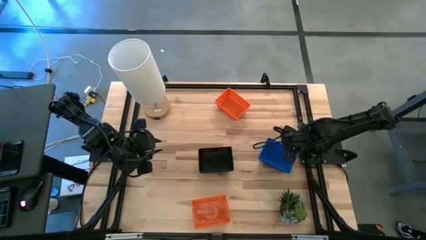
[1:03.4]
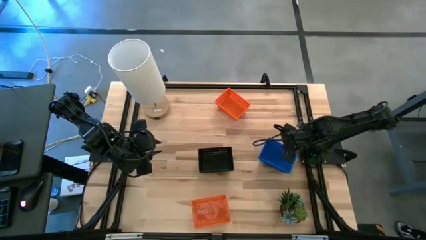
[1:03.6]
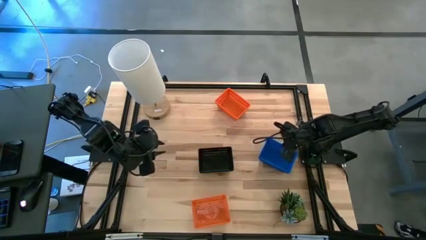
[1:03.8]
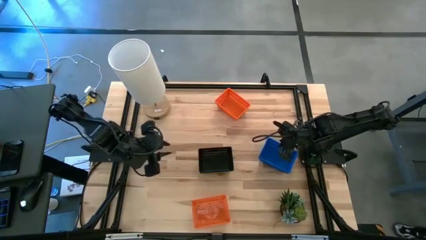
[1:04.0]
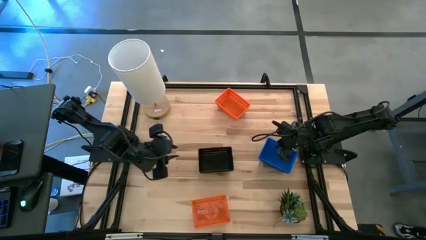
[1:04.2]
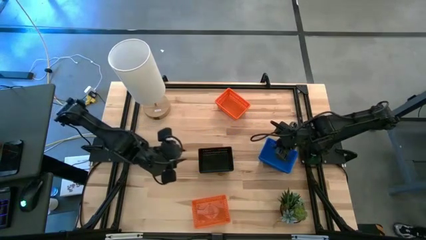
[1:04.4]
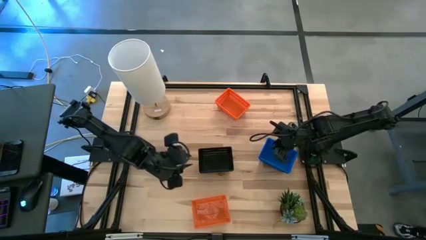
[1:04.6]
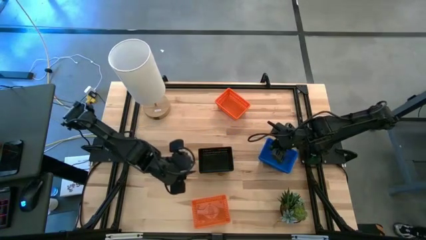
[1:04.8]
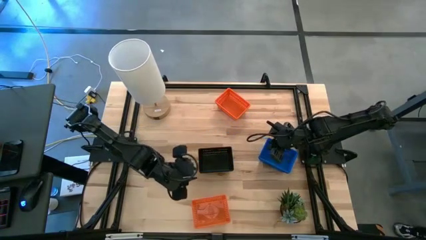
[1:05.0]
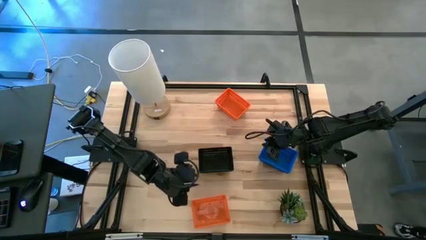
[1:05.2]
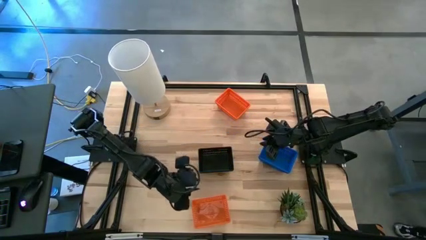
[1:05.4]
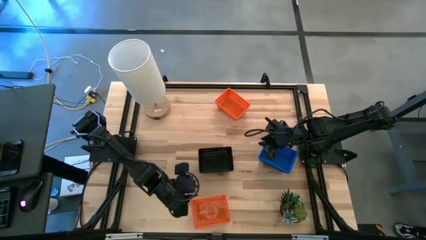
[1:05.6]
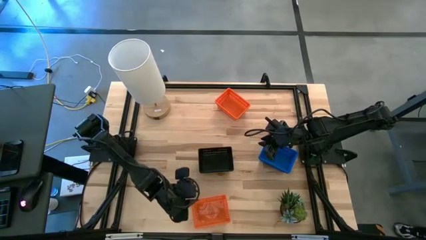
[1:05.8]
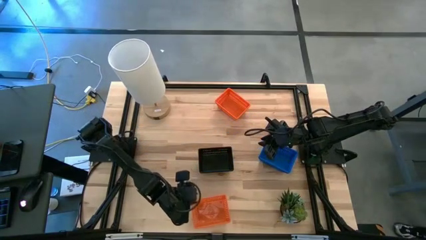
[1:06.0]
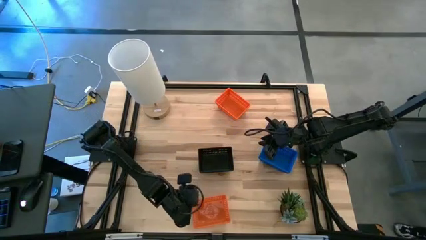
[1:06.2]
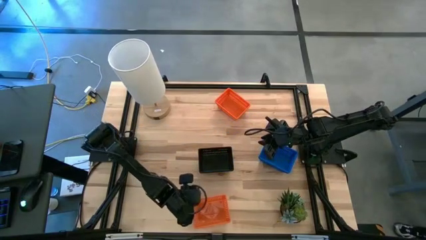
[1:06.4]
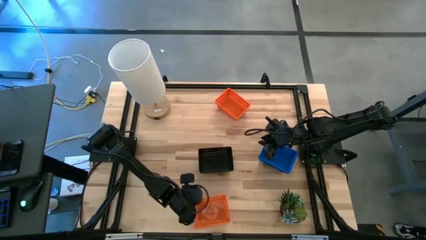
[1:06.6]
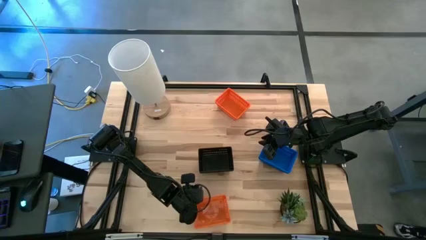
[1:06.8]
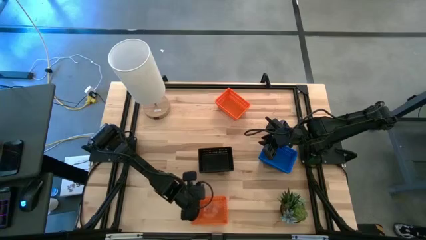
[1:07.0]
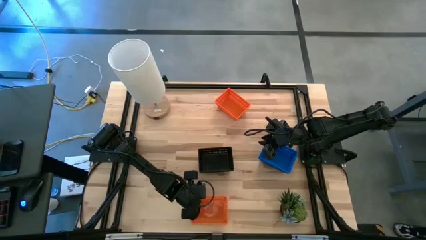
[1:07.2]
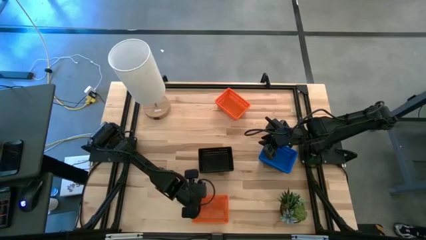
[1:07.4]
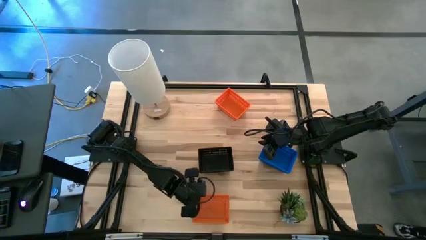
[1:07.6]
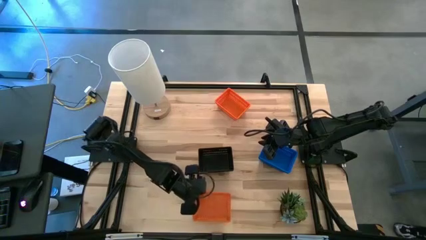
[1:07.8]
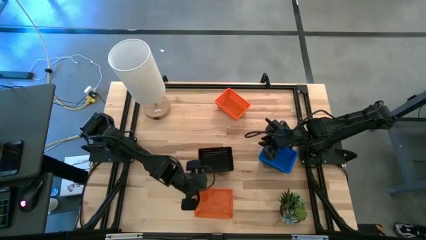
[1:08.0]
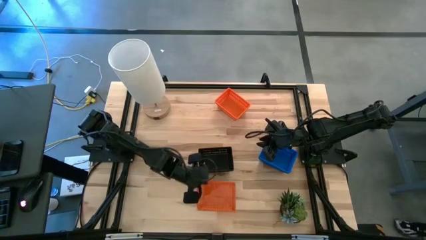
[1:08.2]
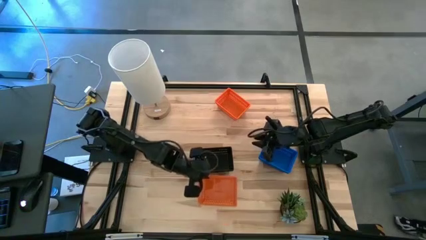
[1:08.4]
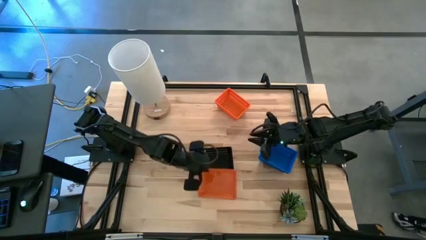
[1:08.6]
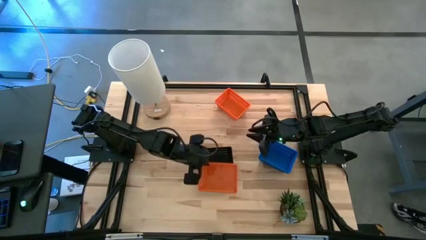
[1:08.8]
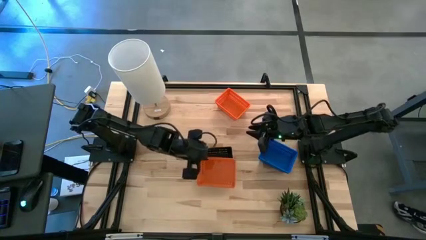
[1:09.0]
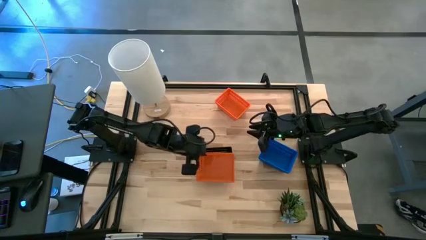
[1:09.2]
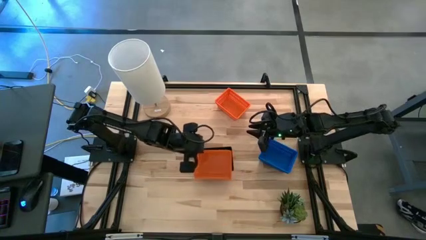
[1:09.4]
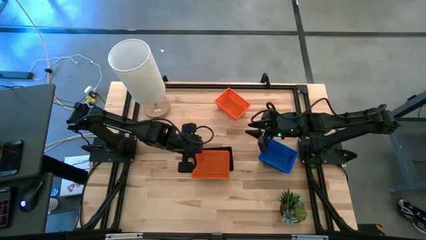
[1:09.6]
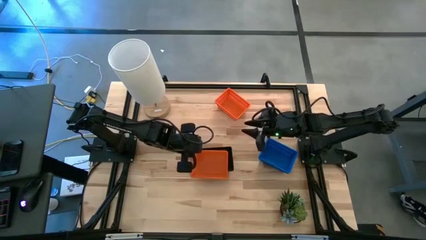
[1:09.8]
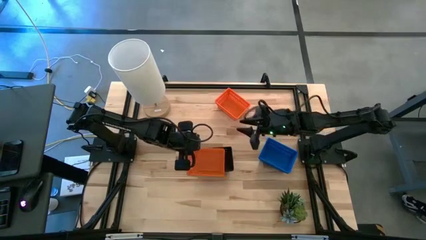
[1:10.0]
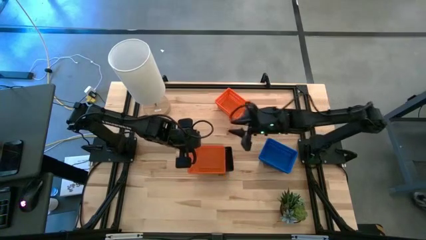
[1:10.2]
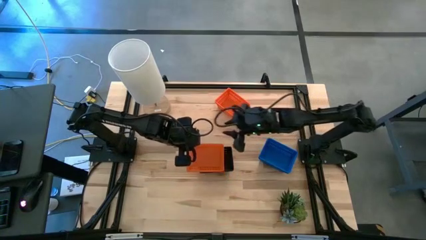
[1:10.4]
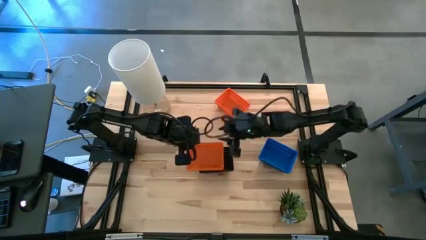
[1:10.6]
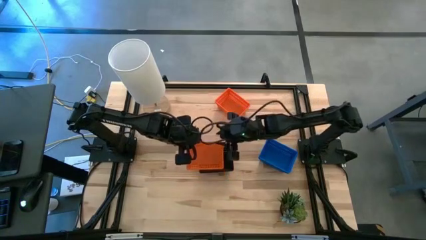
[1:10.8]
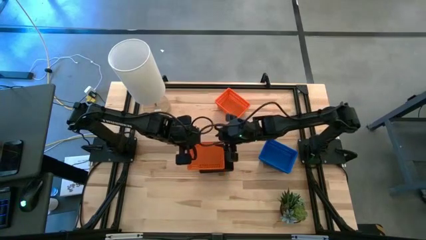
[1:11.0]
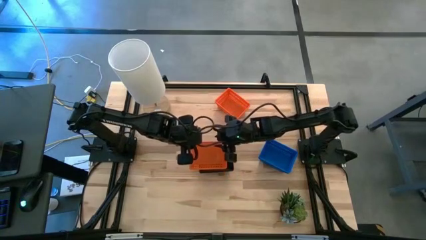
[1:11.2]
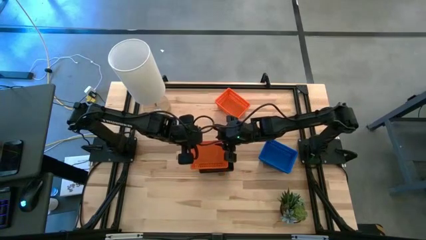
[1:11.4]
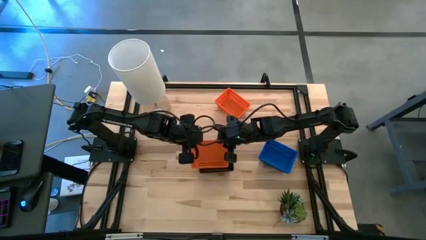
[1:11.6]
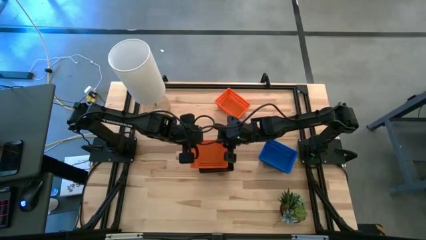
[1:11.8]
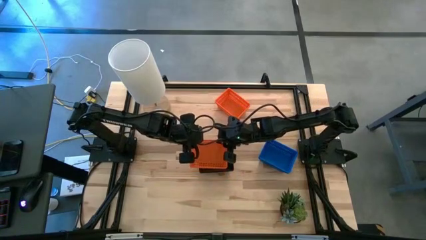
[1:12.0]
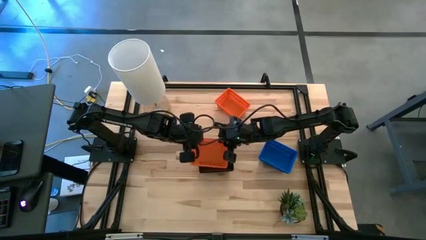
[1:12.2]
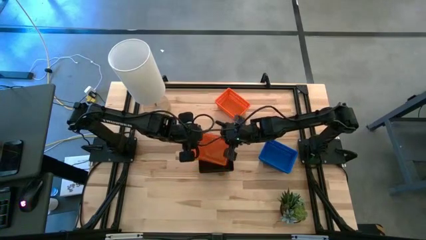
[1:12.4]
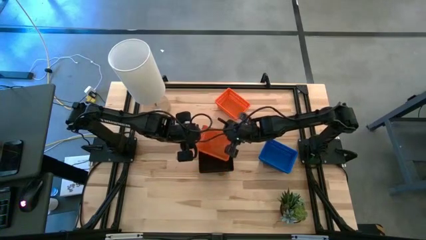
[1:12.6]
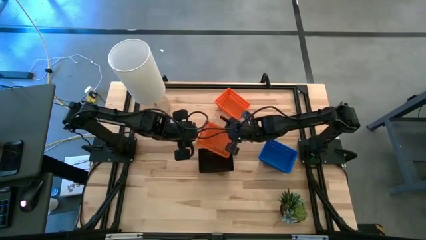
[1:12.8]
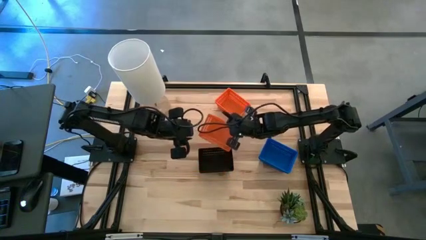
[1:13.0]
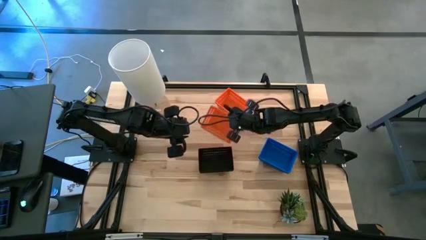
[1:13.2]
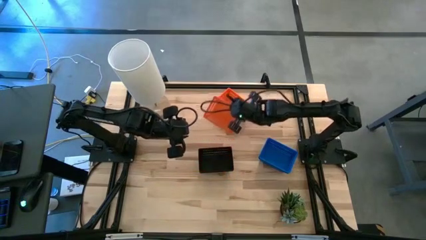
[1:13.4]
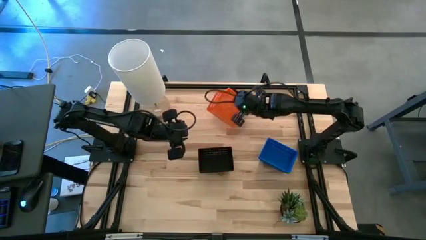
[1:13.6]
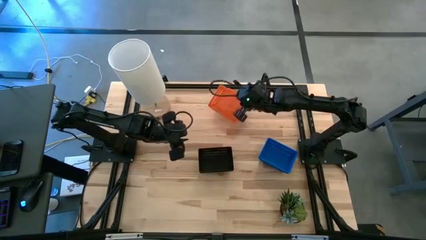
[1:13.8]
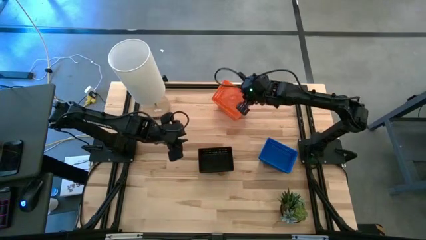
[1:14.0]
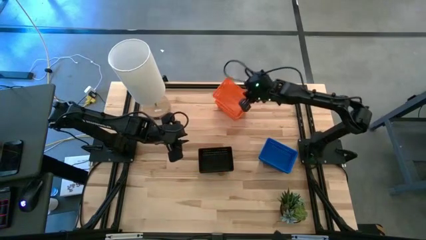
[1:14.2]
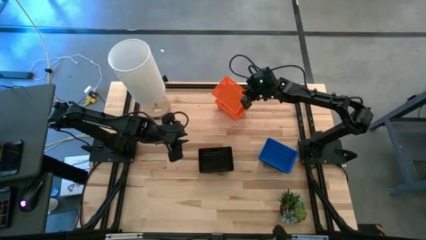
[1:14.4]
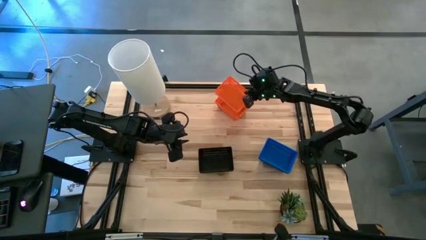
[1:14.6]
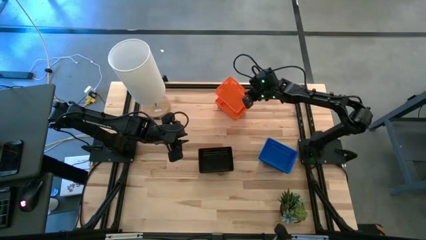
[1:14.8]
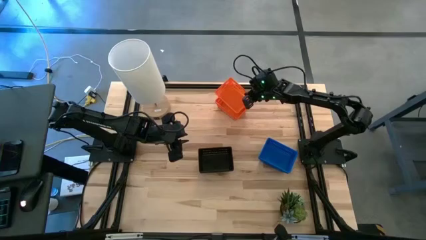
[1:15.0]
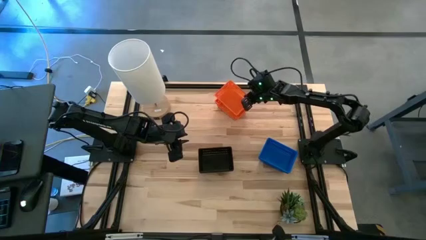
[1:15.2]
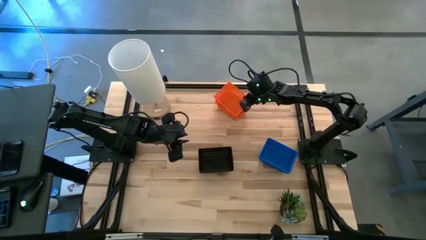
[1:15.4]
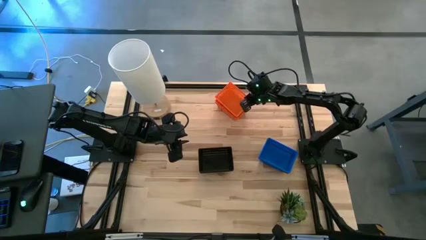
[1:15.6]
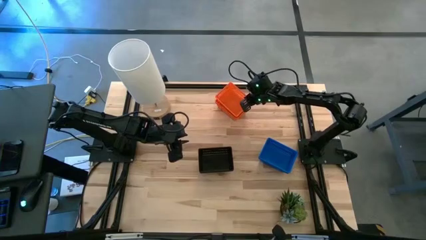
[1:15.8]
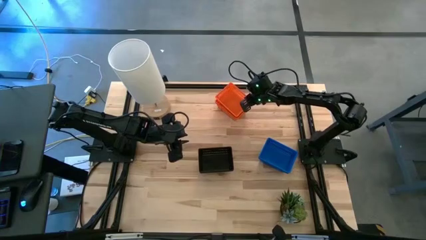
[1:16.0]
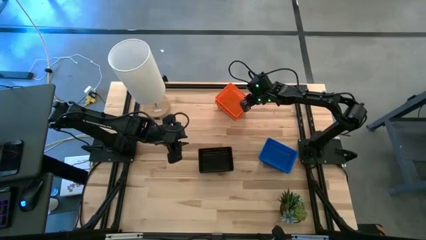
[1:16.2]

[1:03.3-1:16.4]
Stack the bottom orange bin on the top orange bin

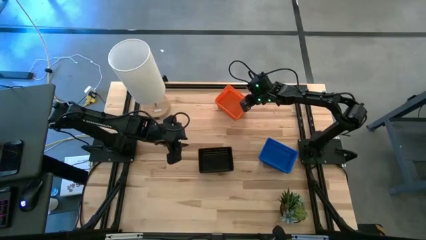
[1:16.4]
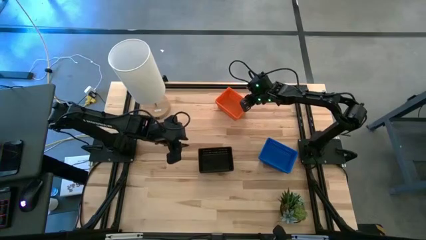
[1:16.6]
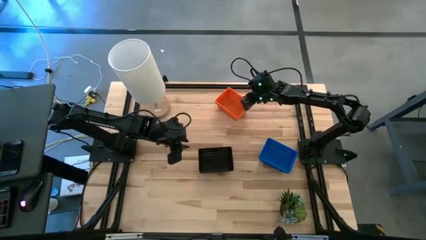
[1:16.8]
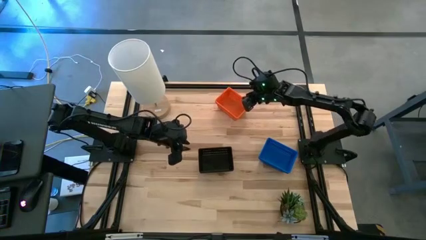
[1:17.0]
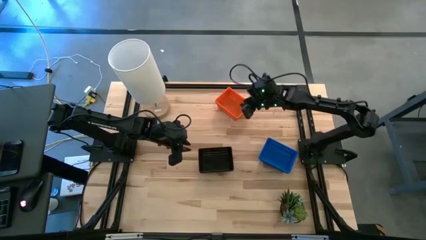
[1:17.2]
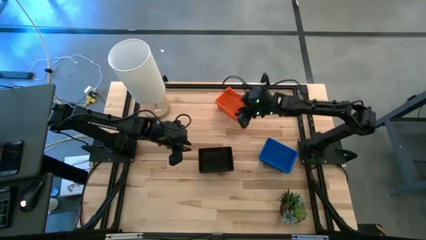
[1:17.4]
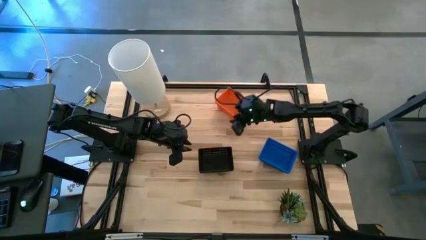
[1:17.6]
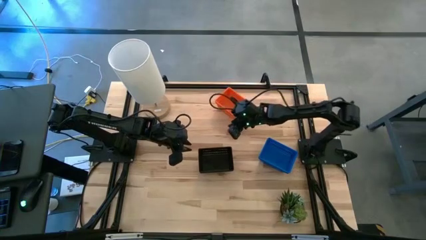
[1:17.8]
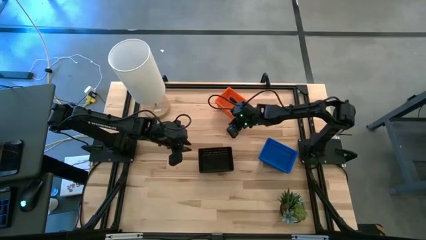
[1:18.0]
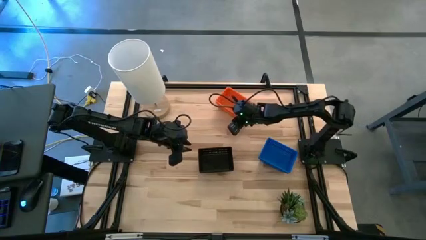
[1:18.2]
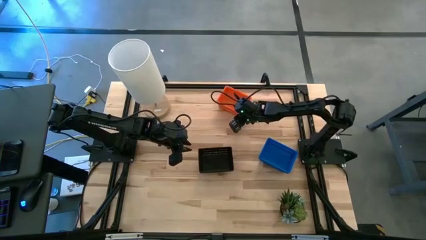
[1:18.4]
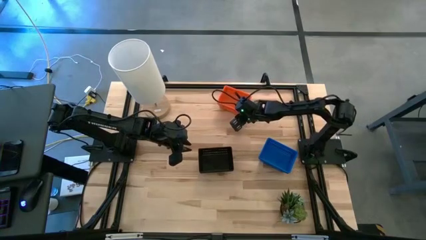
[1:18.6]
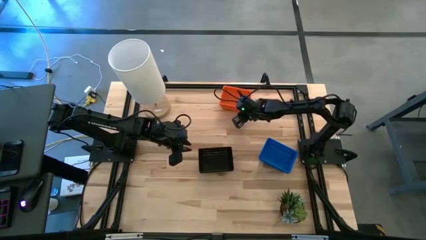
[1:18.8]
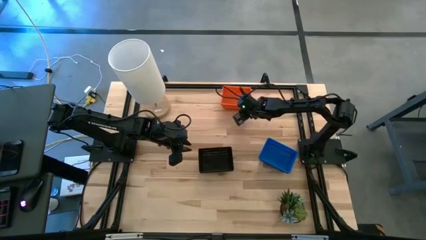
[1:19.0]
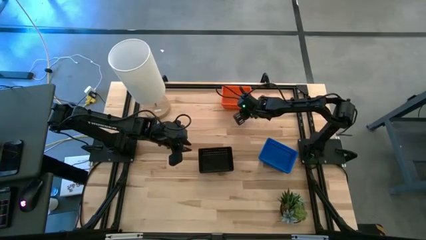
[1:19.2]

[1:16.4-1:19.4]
Adjust the stacked orange bins
